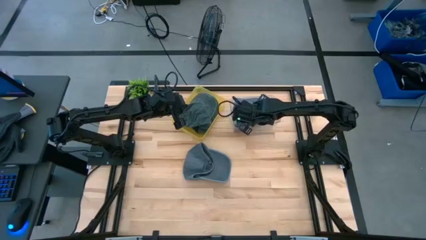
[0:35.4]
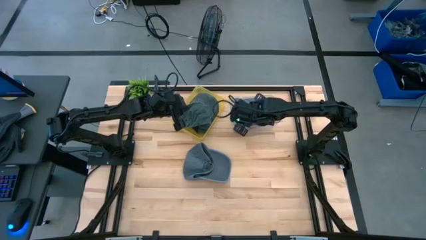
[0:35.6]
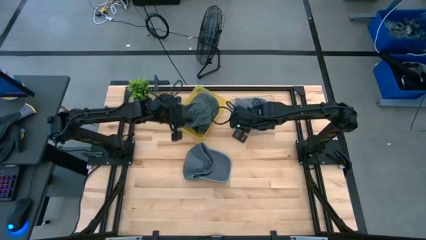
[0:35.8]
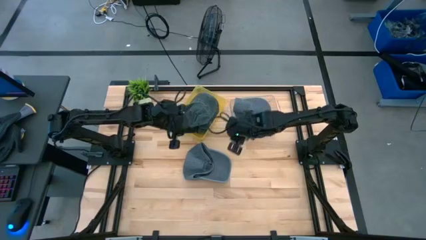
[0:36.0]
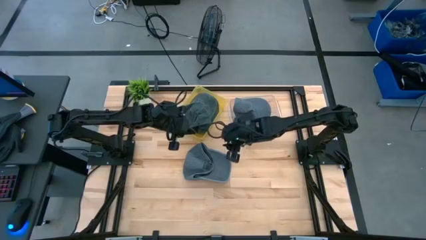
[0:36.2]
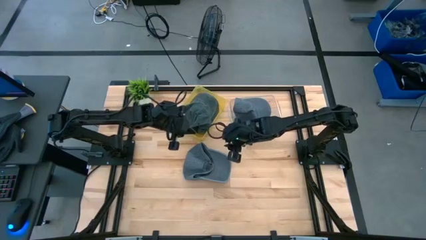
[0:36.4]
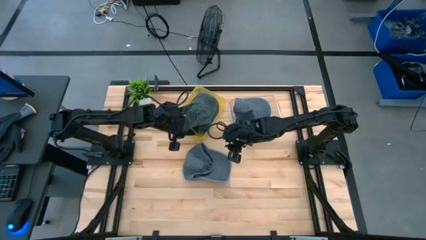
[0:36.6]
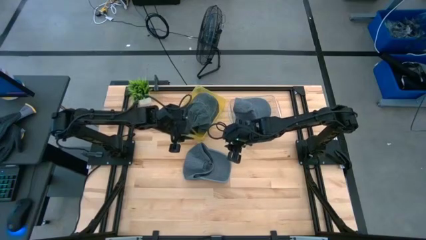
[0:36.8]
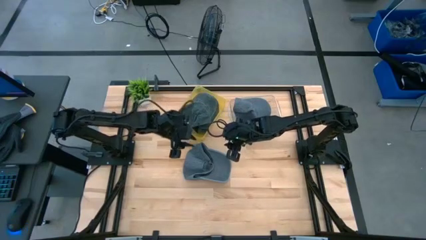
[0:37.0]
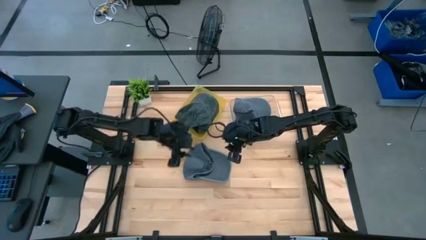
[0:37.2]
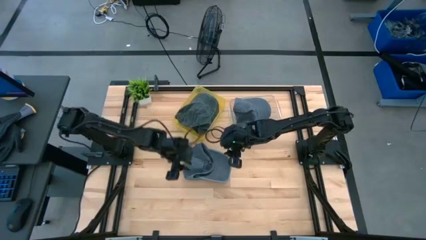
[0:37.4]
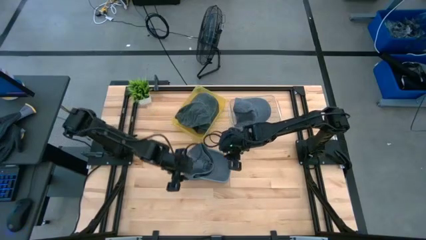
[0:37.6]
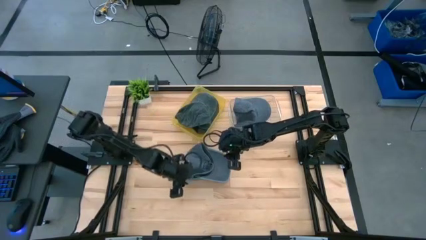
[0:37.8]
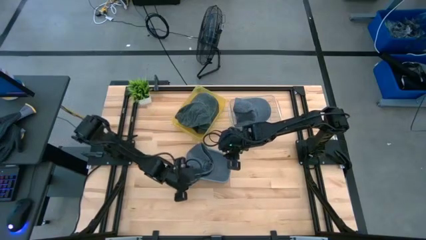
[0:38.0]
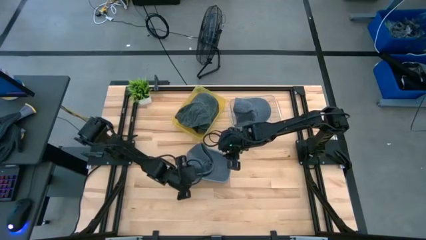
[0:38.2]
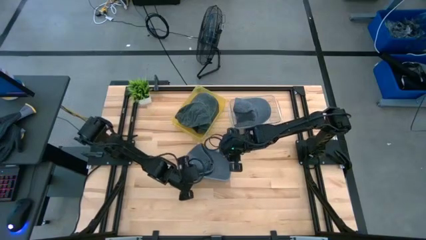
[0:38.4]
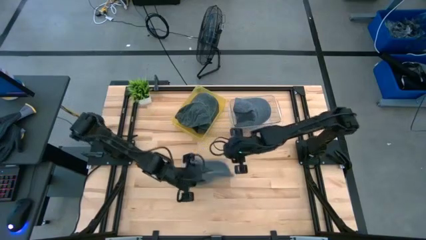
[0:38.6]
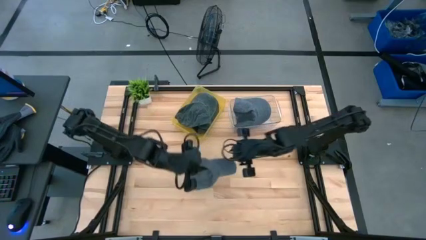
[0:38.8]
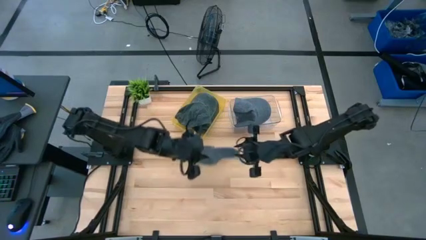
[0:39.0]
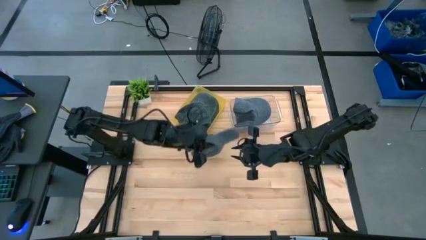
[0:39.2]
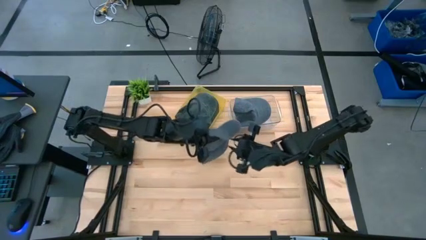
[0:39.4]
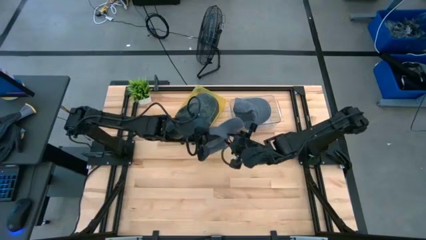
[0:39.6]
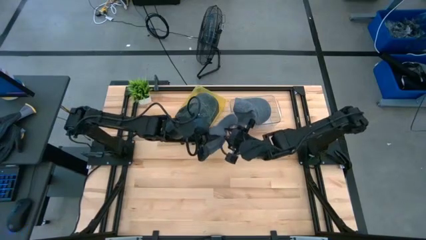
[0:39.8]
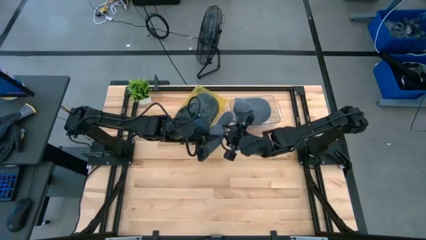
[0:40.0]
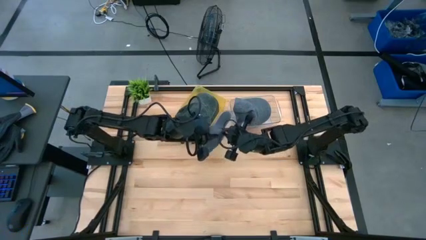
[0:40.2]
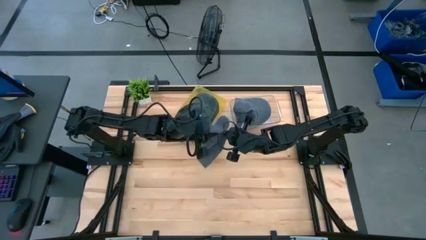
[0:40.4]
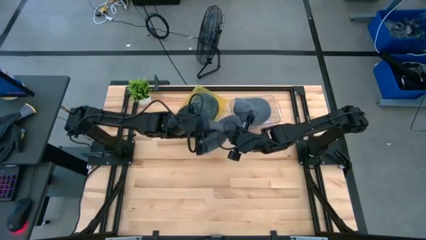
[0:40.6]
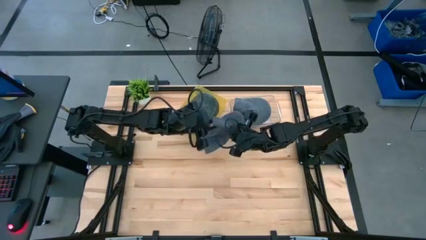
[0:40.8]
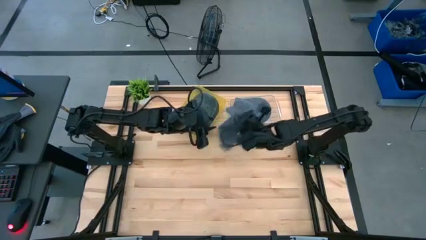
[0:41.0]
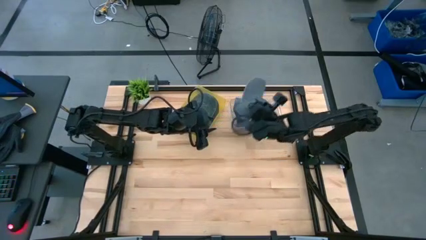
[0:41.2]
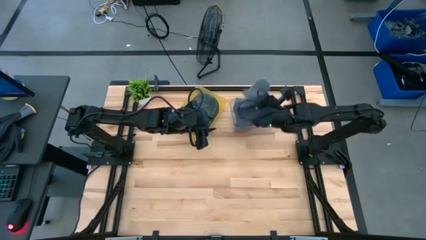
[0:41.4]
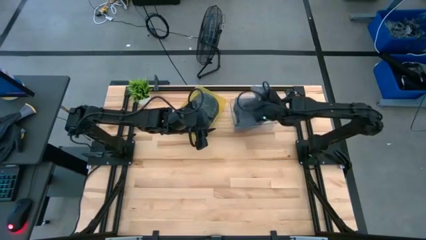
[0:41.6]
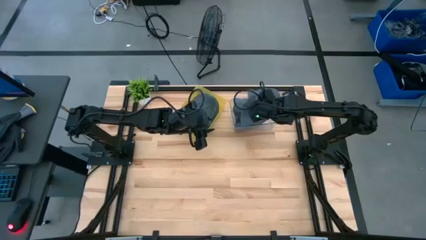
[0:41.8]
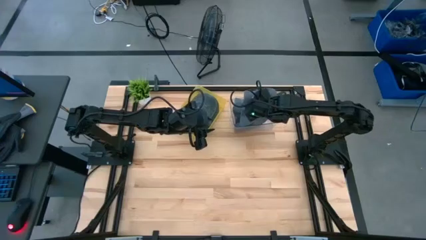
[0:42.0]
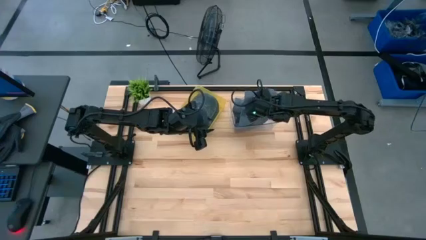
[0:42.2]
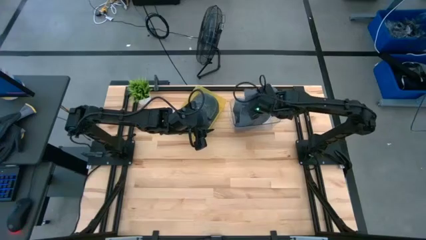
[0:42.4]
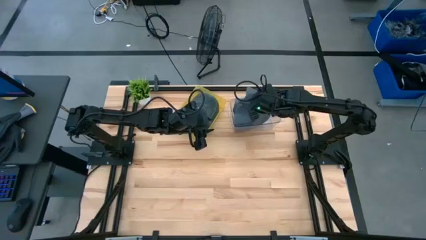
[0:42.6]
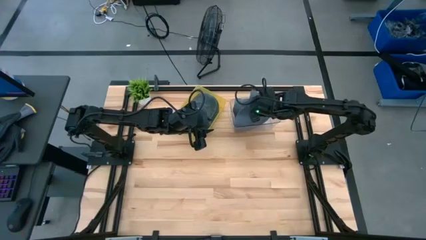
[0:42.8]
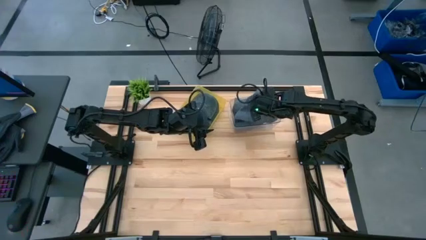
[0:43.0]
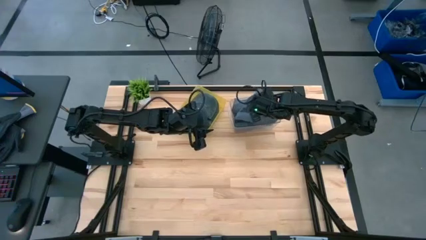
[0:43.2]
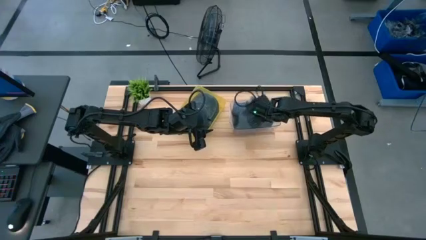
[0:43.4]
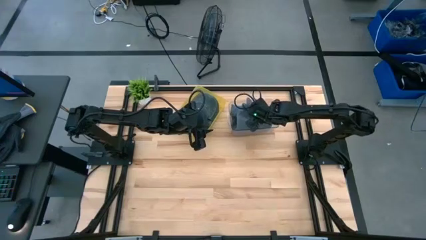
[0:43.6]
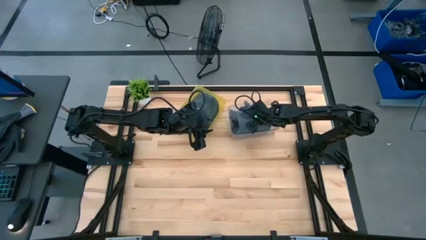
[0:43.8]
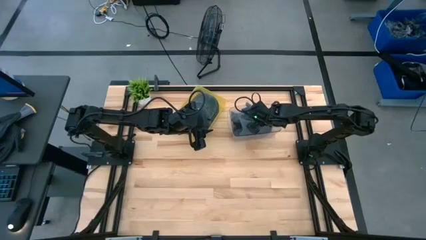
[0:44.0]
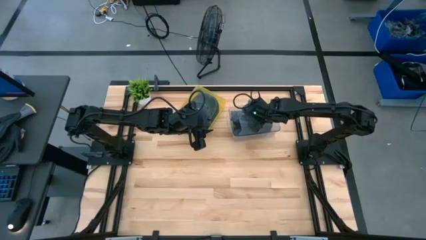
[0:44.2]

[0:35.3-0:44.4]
Task: Pick & Place hat
Put the dark blue cap into the transparent bin

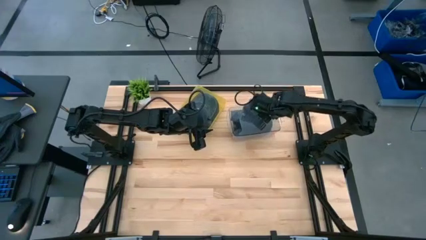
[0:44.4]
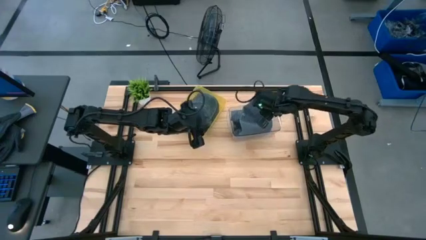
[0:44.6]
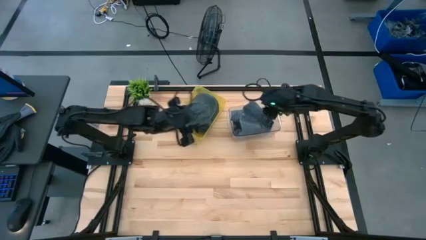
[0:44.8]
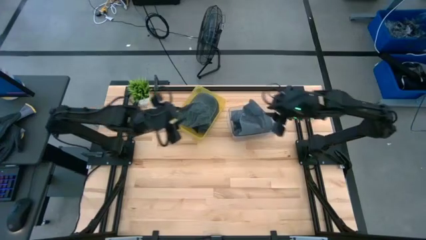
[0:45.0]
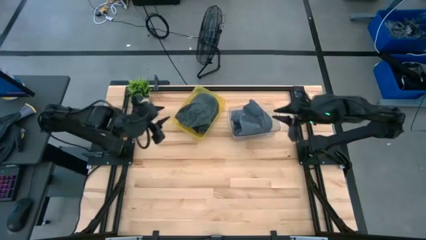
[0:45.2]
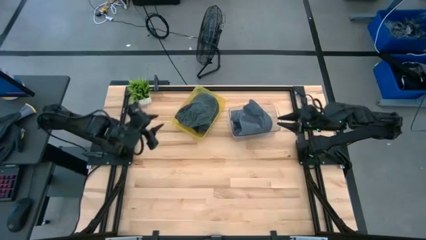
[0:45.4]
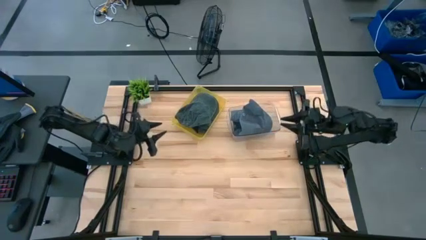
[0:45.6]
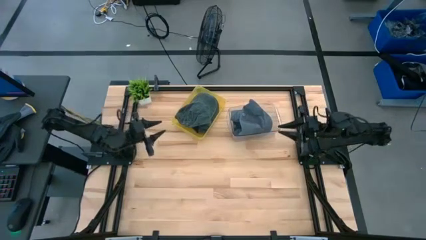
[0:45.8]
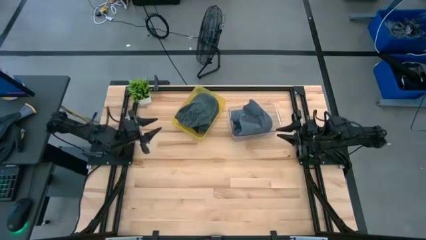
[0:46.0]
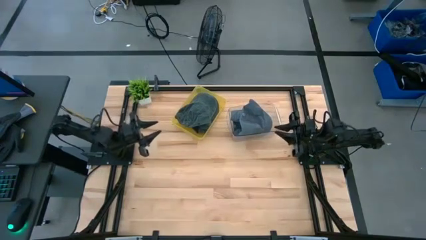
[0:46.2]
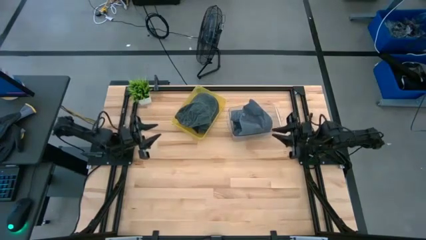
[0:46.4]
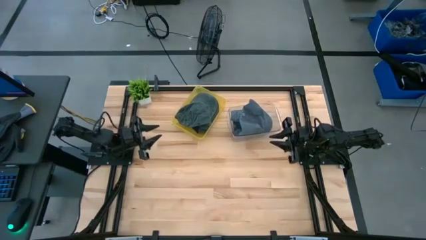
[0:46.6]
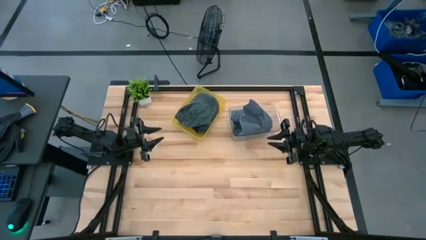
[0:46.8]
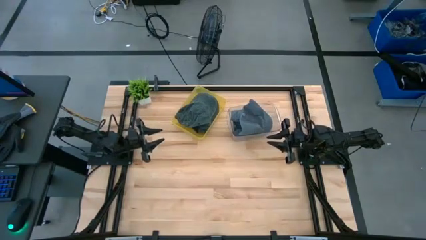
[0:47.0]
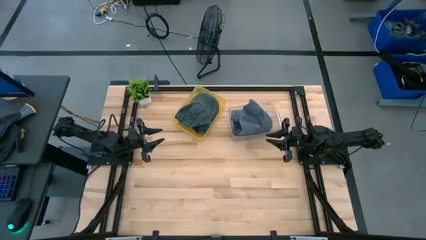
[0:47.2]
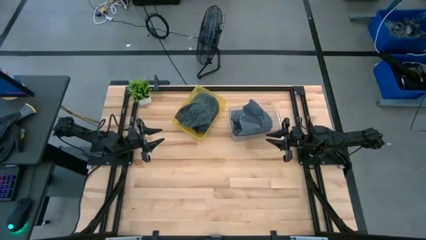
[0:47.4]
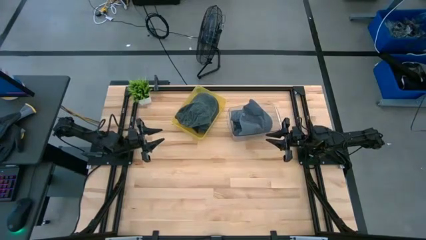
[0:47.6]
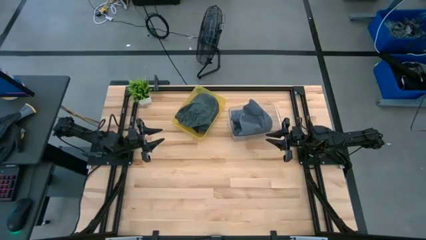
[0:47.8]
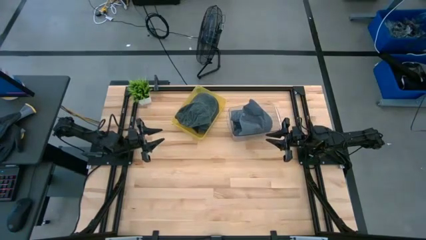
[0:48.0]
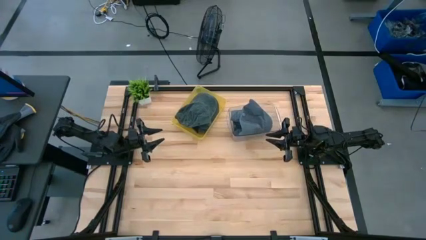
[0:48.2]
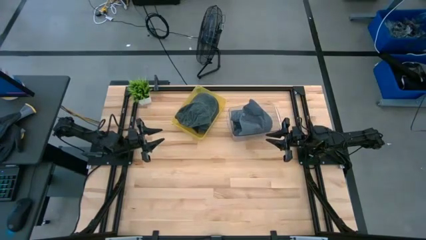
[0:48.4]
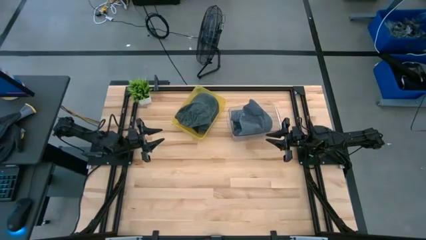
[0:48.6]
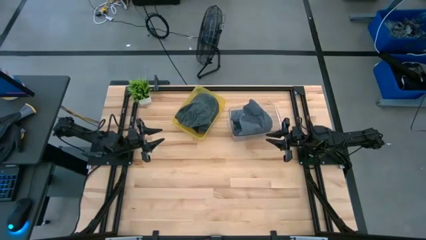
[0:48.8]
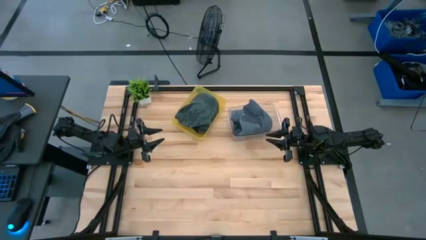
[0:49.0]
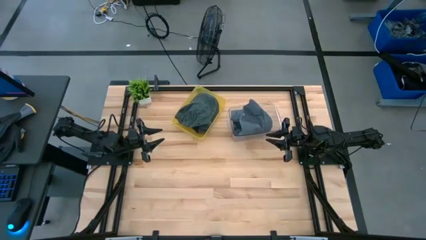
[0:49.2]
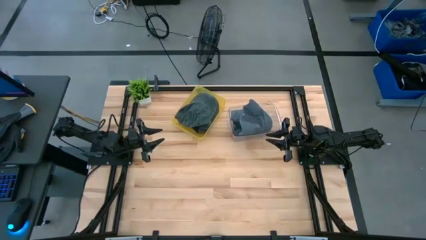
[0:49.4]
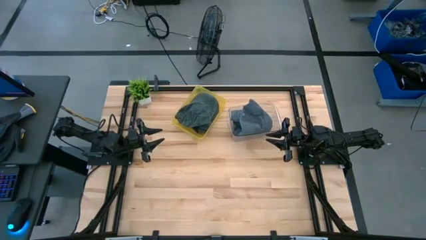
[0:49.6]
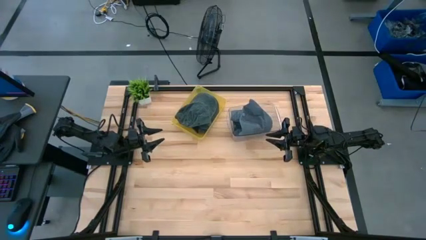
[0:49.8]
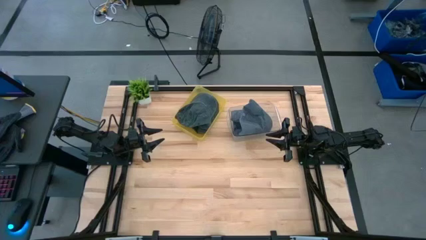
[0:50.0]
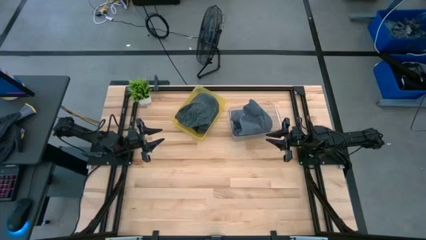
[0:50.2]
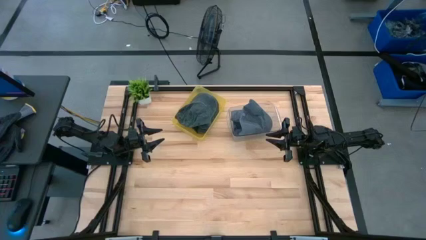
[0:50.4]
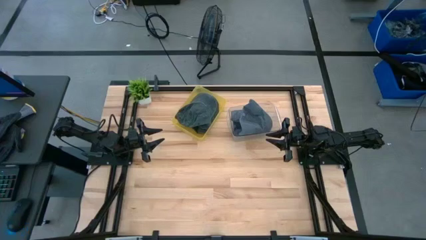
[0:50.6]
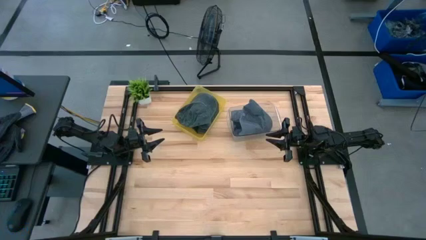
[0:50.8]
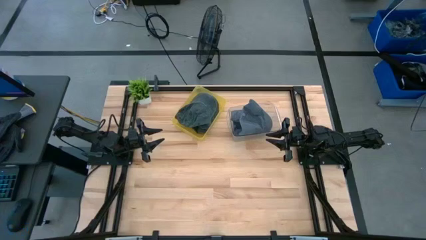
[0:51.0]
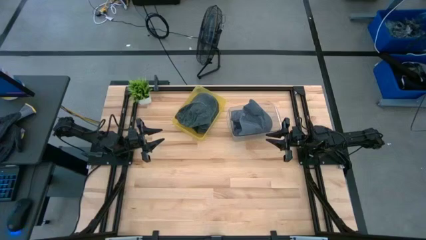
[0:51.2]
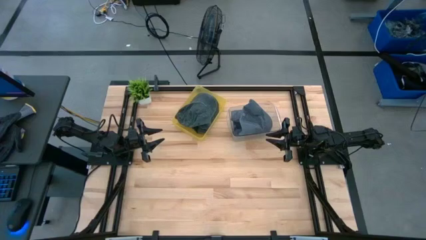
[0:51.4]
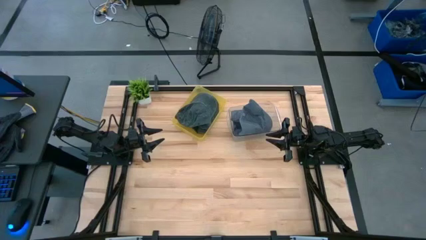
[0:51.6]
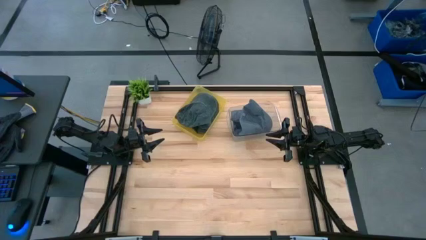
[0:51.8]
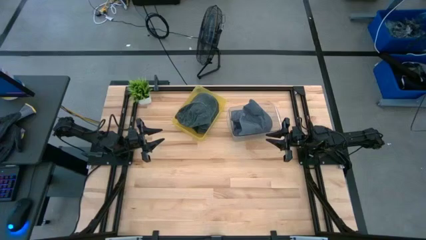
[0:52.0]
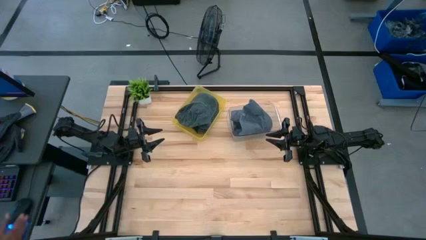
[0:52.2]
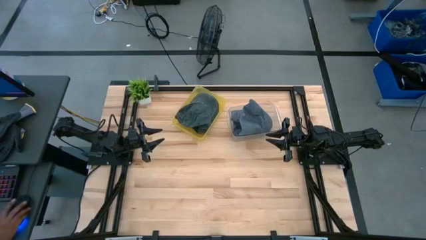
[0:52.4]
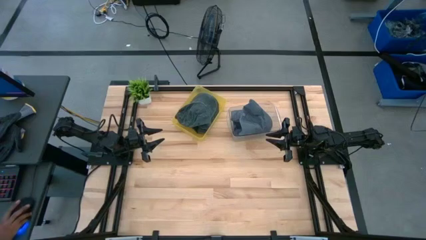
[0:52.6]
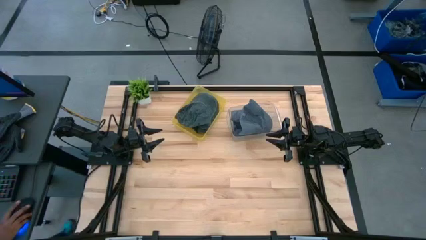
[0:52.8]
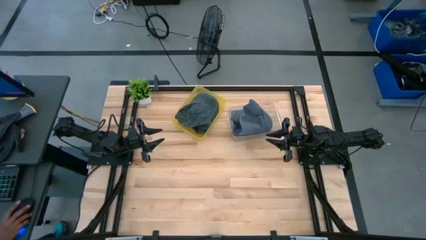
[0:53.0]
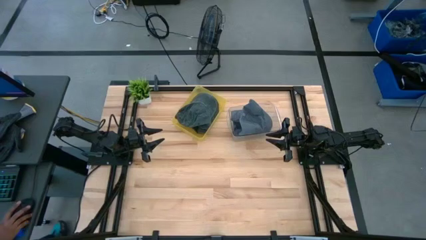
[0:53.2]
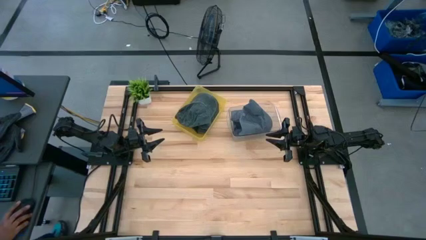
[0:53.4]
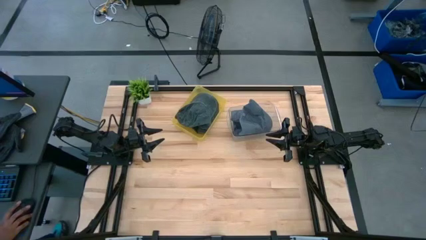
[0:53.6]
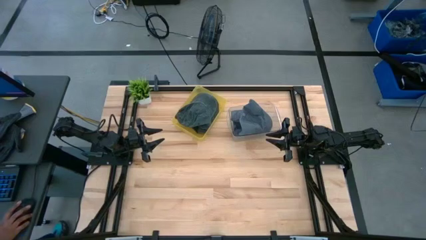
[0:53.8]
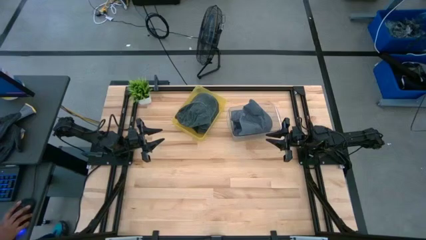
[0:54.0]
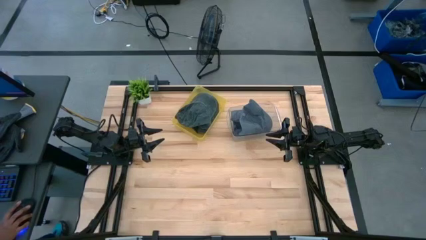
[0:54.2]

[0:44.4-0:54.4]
Return to Home Position
